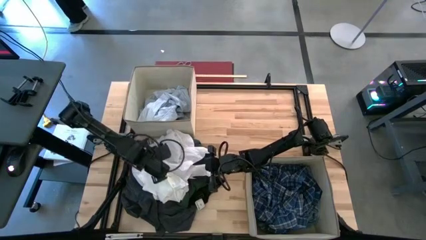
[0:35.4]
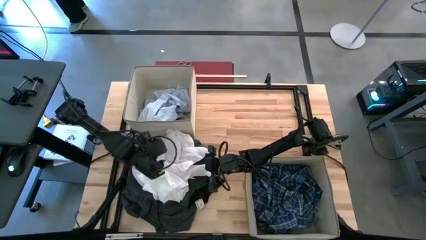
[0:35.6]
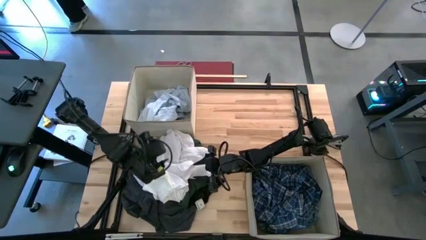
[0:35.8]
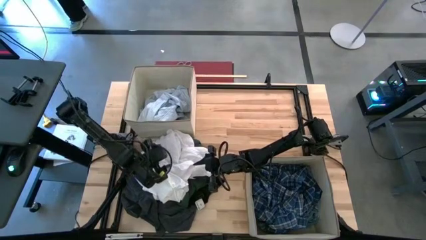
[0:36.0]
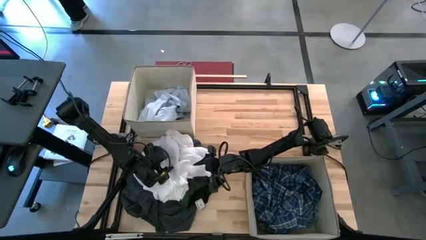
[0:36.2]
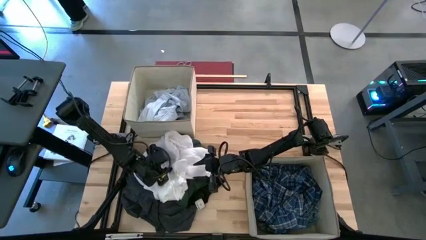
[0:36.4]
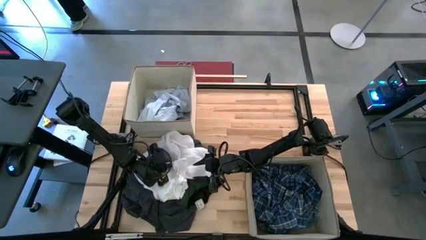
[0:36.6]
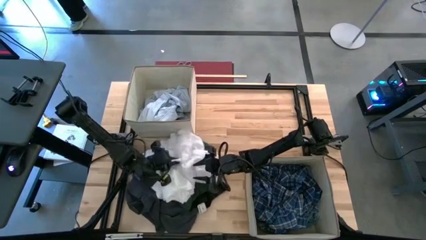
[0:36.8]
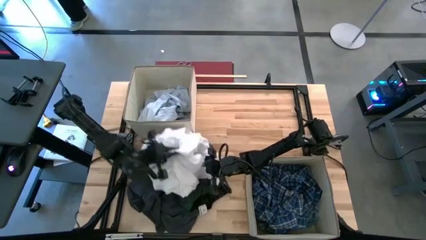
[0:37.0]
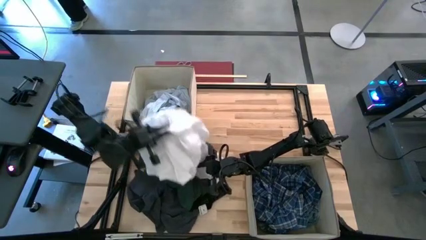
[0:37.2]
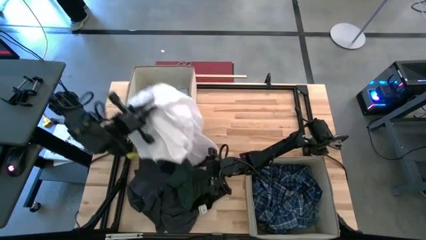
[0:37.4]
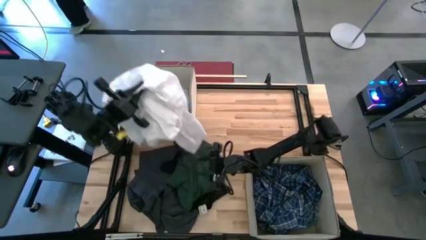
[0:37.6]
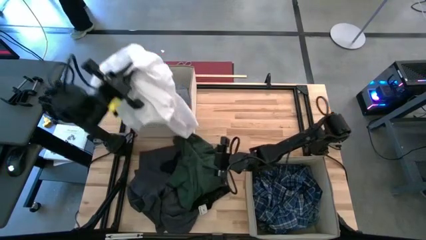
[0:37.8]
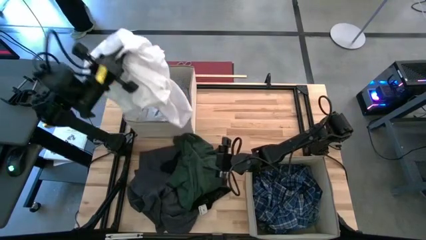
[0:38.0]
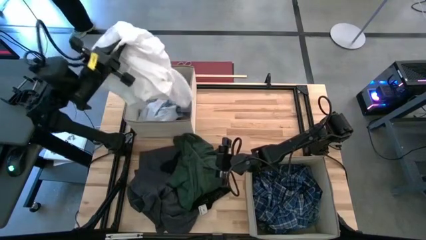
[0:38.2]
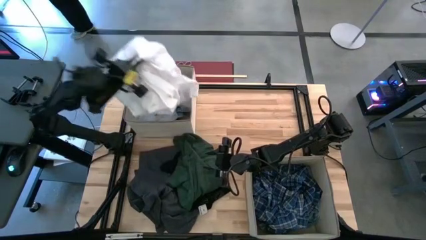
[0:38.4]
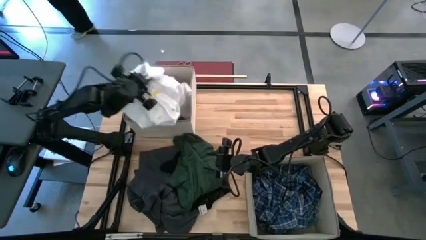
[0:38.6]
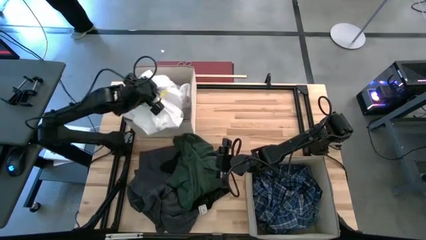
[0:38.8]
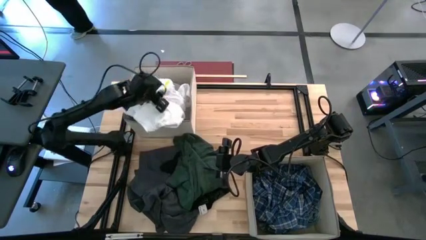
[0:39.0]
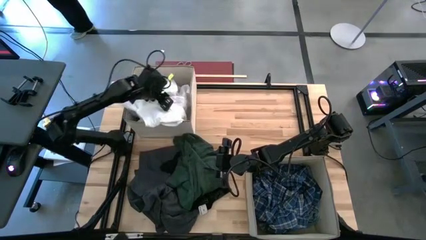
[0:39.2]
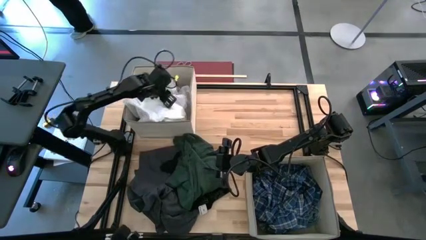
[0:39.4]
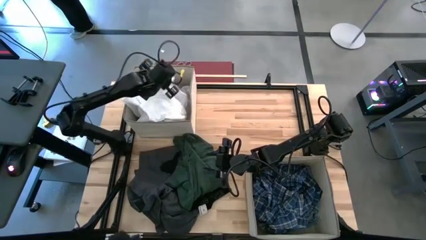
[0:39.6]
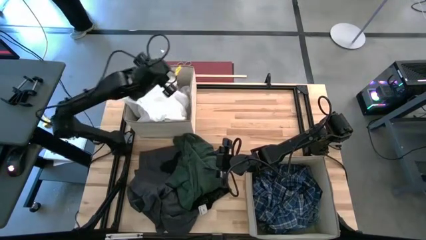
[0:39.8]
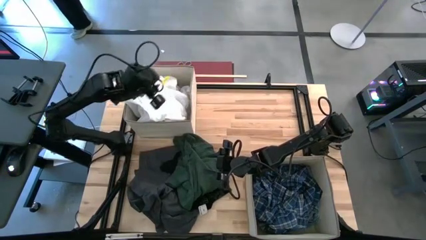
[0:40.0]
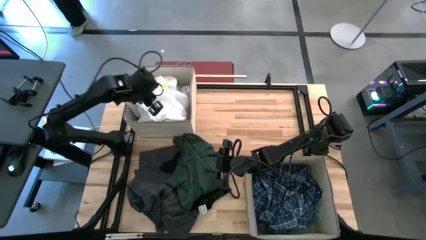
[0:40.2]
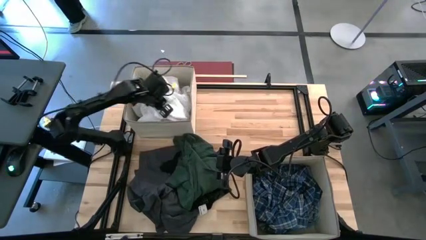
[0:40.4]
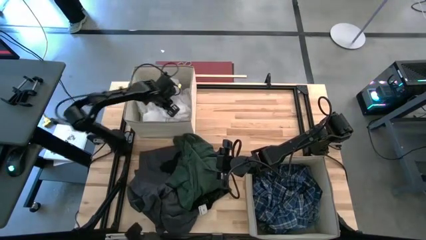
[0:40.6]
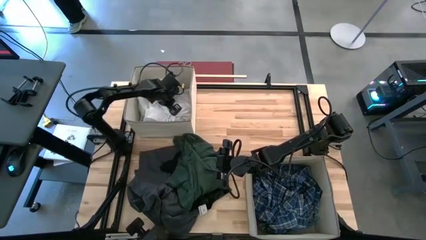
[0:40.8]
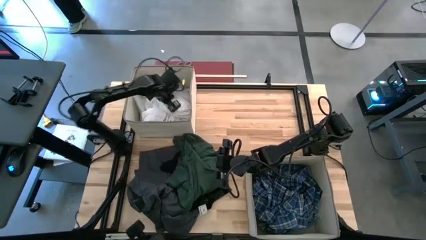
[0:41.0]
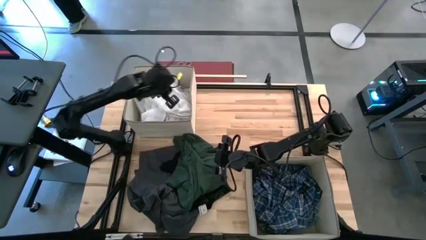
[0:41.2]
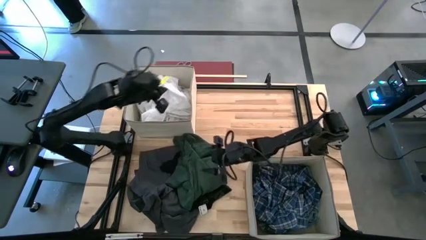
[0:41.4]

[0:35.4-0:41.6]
Task: Sort clothes
Put the white polo shirt into the top laundry bin

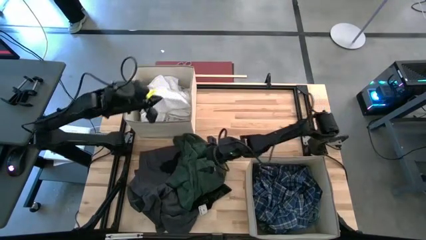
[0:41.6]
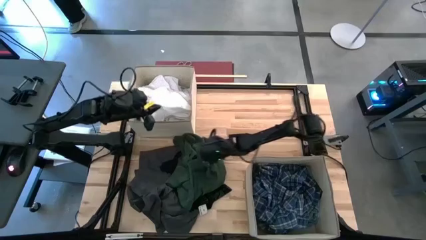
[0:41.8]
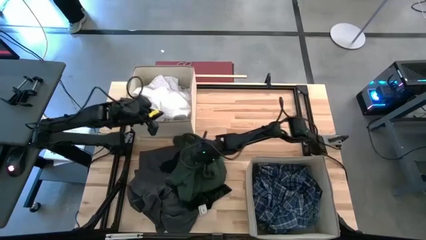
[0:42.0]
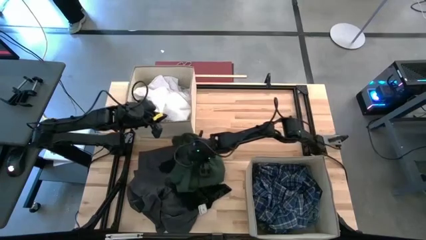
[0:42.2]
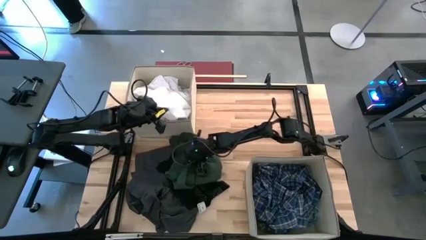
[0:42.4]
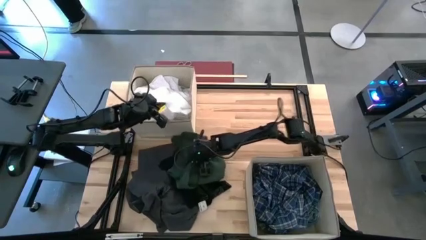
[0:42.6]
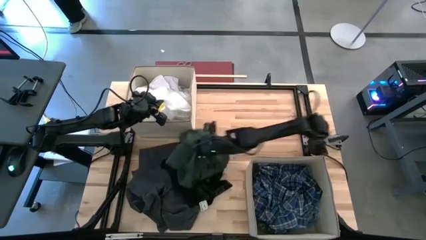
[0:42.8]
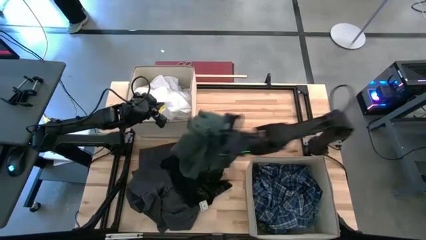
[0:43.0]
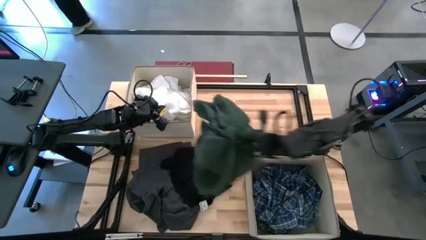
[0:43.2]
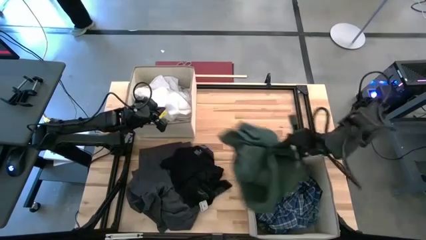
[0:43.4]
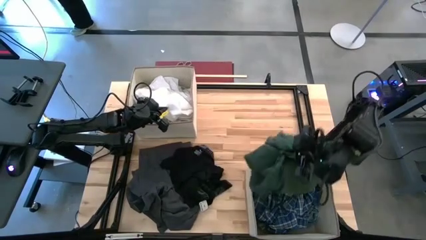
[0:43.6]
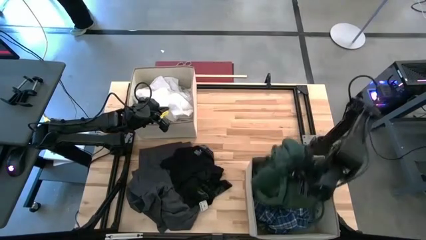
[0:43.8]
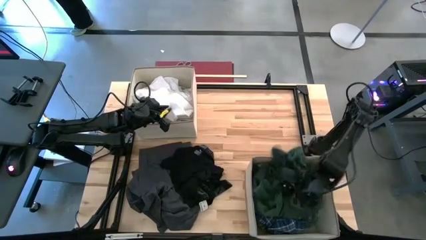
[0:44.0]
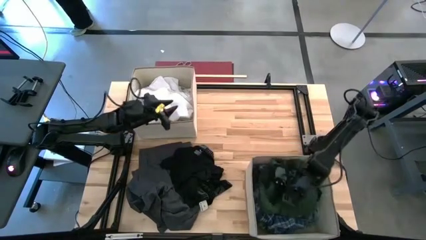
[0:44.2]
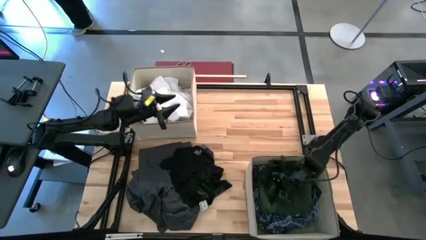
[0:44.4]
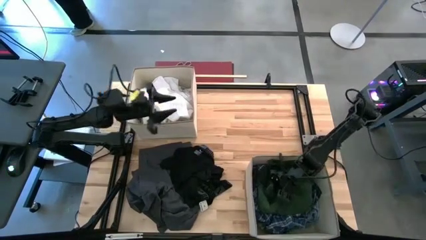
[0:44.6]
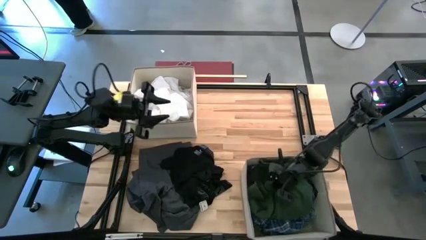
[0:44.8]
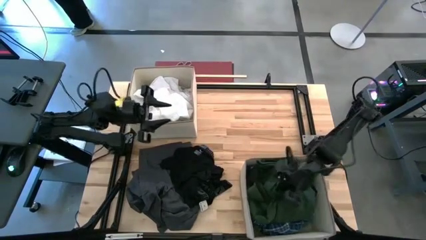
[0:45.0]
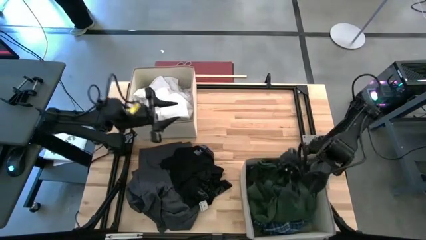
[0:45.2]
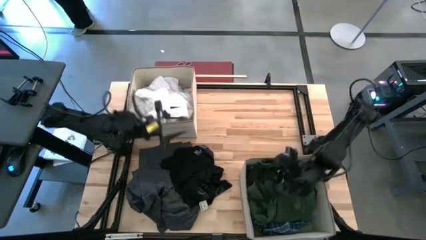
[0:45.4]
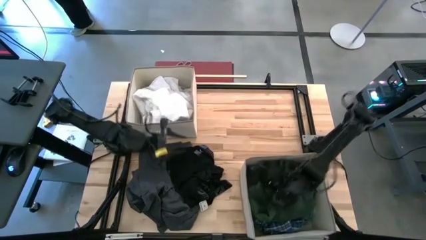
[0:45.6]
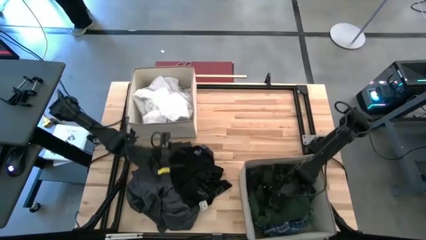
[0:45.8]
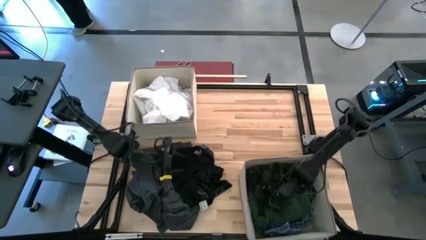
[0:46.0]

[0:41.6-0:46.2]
Put the green shirt into the bottom laundry bin

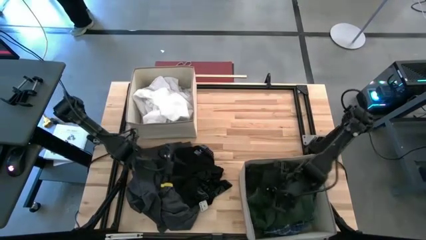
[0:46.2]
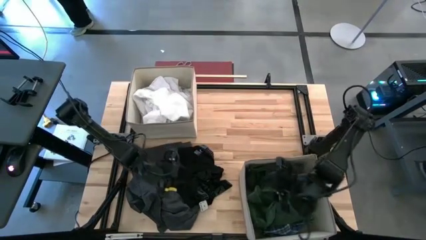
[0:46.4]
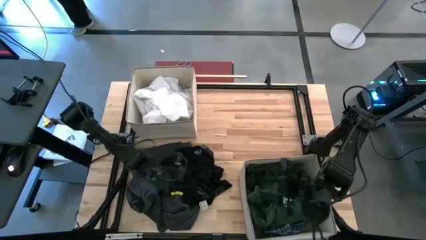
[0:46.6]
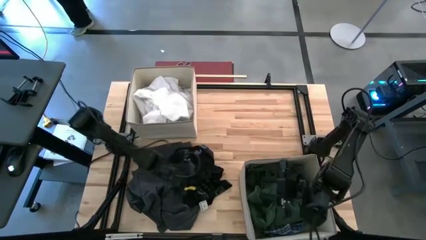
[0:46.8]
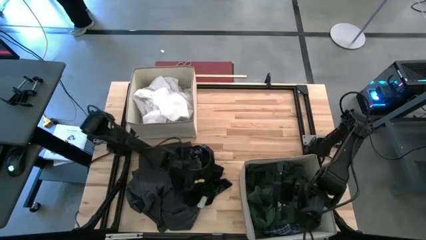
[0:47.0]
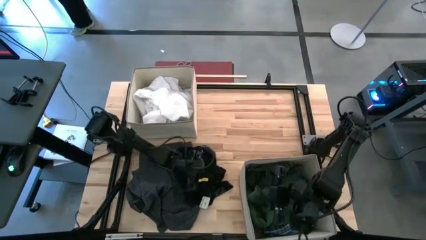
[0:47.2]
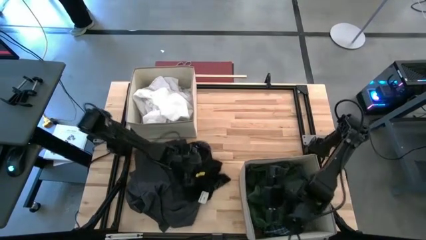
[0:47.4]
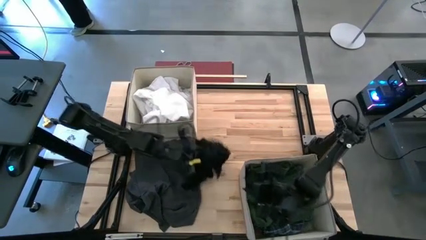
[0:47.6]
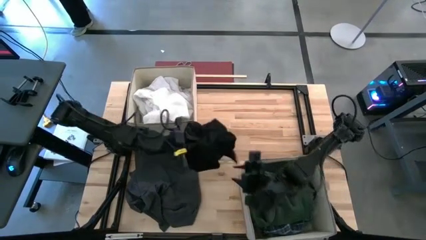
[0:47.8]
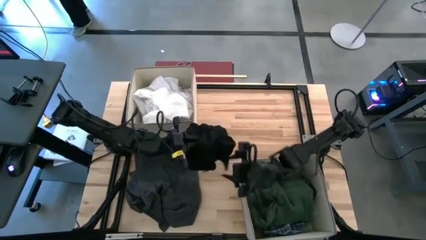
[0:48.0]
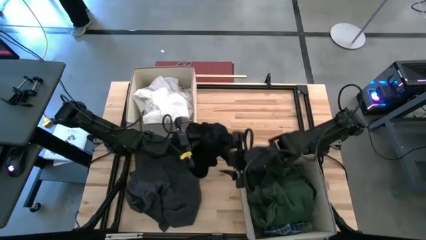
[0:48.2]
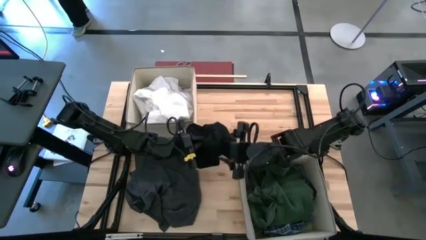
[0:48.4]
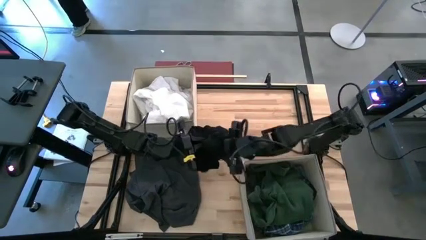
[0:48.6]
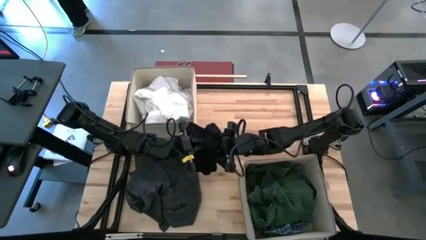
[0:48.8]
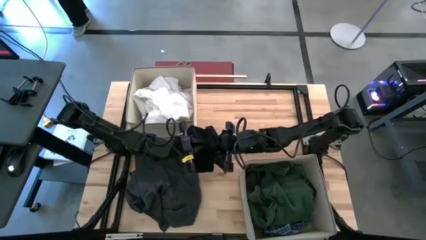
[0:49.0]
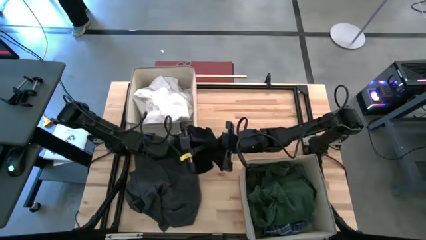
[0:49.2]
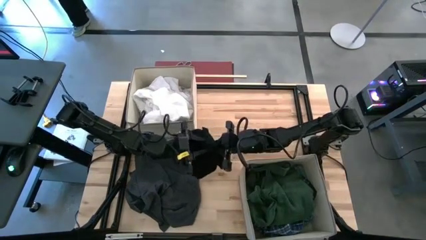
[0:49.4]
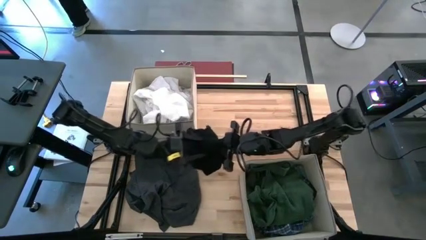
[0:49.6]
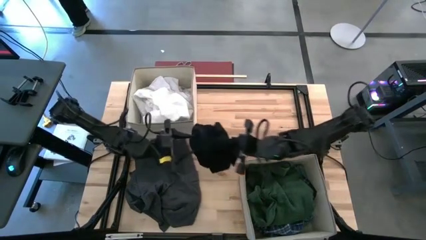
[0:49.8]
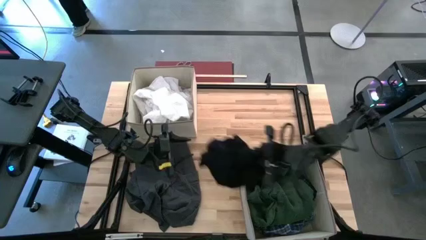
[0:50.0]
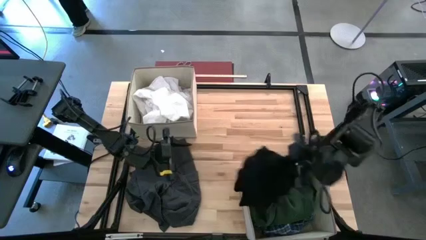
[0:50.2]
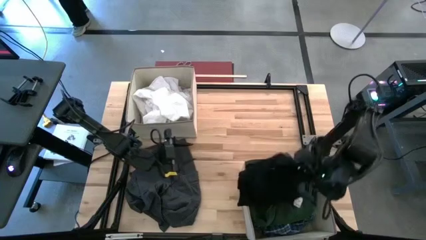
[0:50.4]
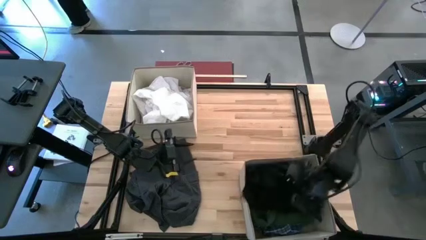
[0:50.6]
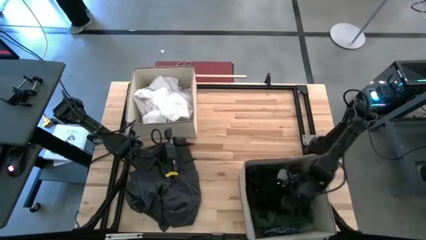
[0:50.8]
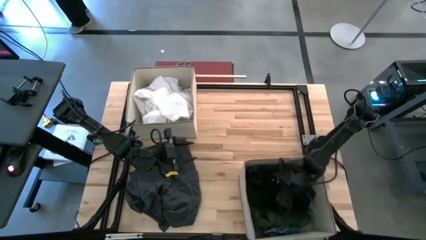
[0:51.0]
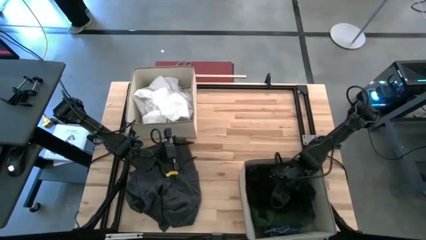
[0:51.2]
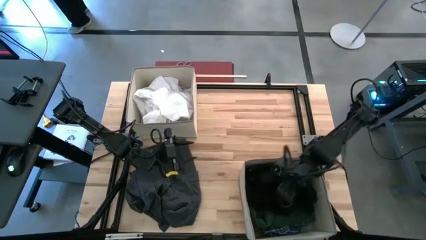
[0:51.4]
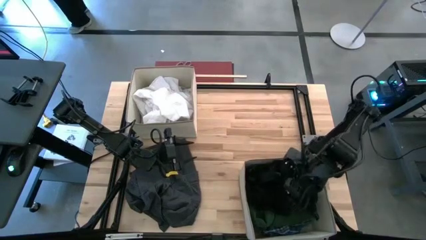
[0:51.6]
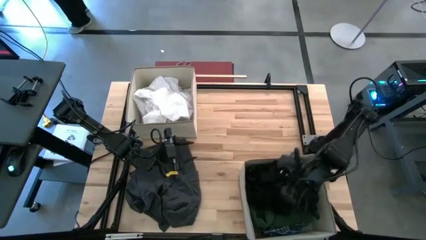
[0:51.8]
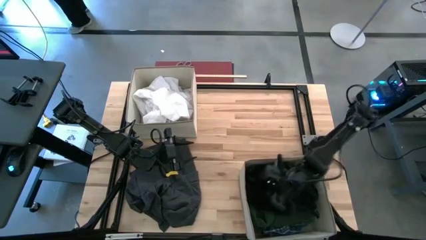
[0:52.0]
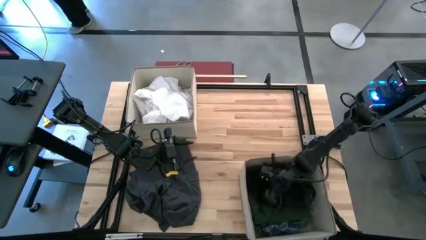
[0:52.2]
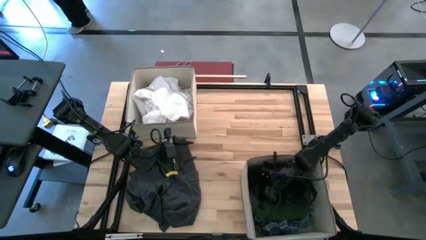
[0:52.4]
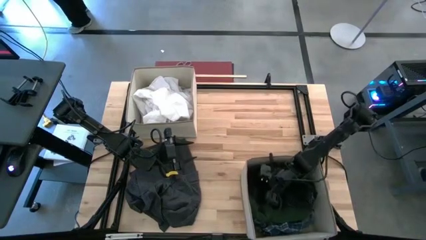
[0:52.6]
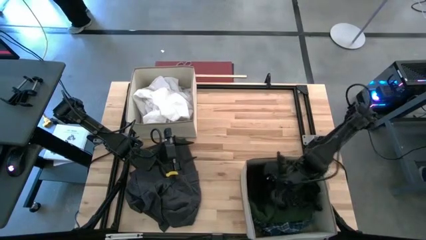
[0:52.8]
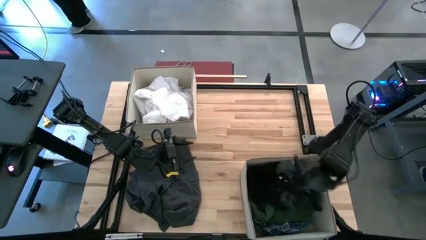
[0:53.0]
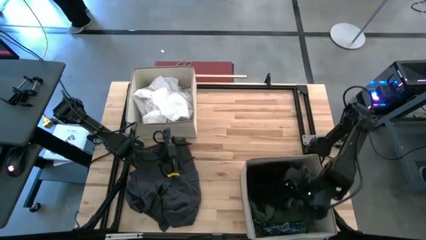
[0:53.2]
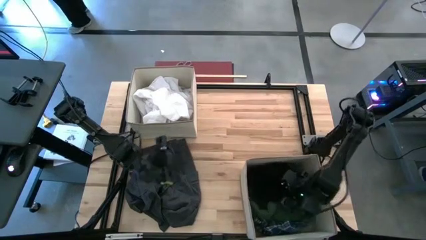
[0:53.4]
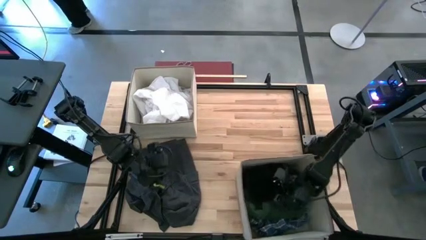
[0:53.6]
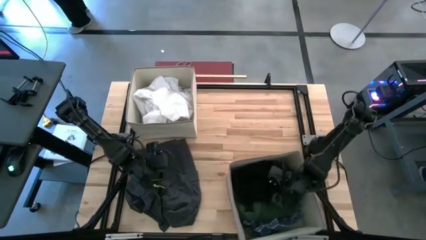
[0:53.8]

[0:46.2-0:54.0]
Put the black underwear into the bottom laundry bin
